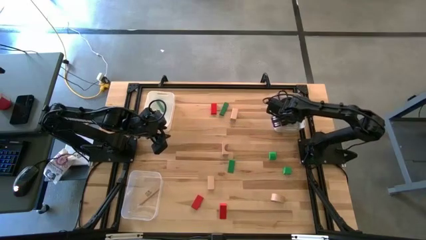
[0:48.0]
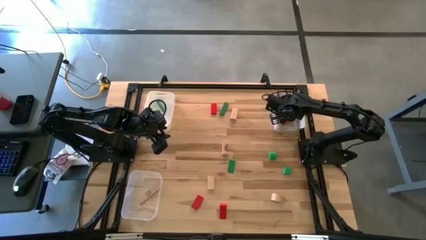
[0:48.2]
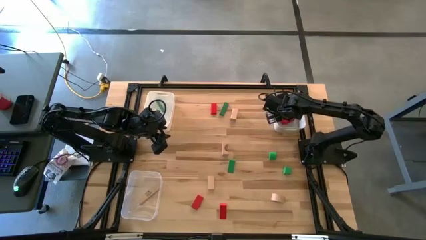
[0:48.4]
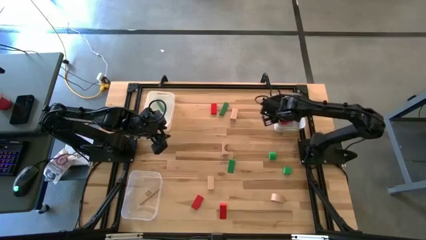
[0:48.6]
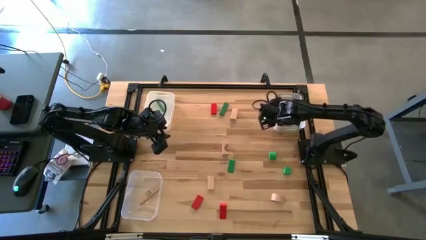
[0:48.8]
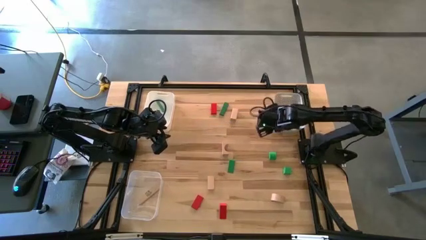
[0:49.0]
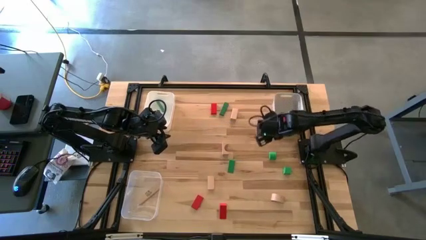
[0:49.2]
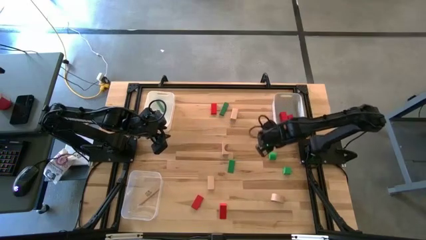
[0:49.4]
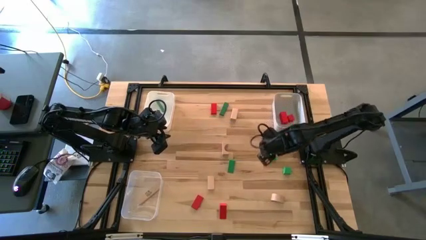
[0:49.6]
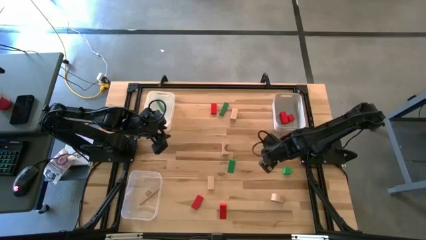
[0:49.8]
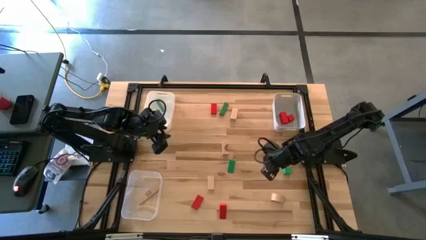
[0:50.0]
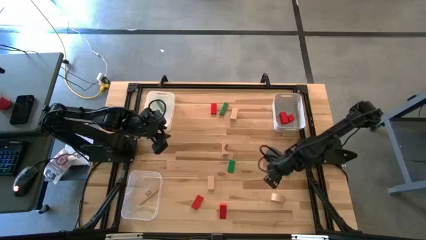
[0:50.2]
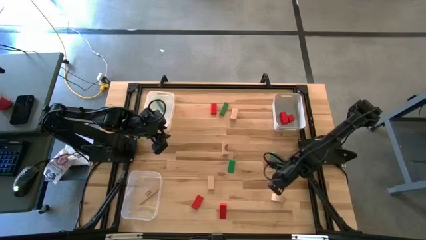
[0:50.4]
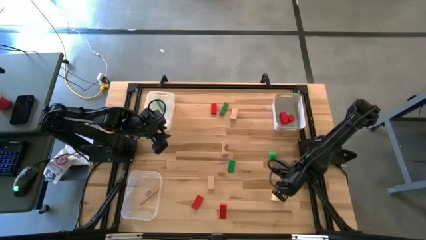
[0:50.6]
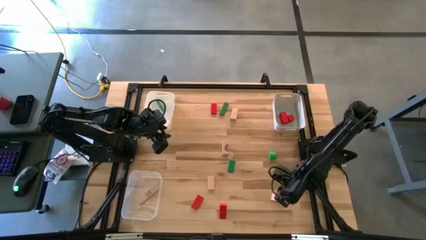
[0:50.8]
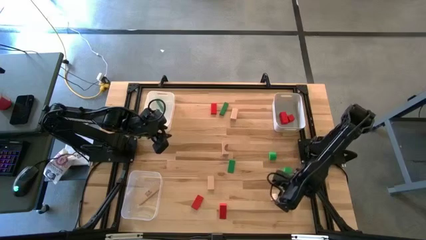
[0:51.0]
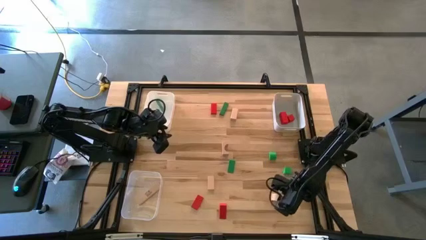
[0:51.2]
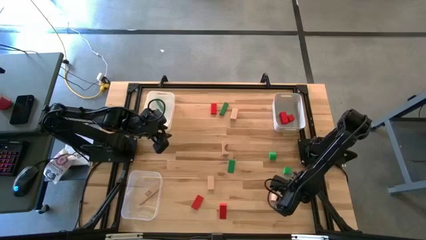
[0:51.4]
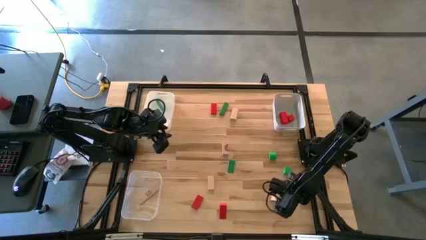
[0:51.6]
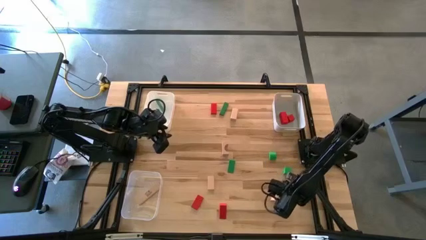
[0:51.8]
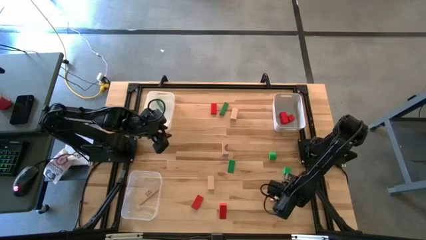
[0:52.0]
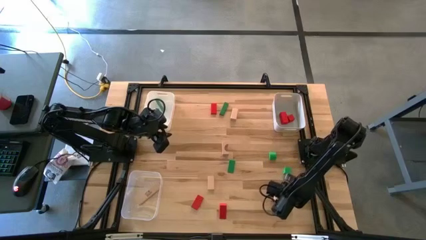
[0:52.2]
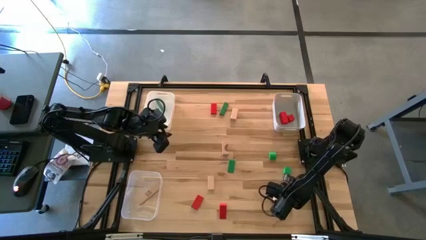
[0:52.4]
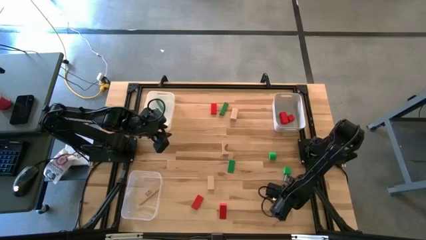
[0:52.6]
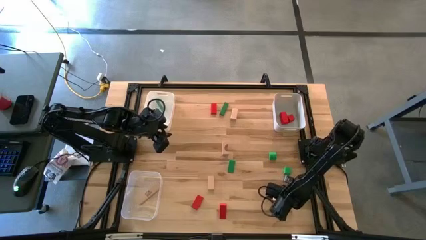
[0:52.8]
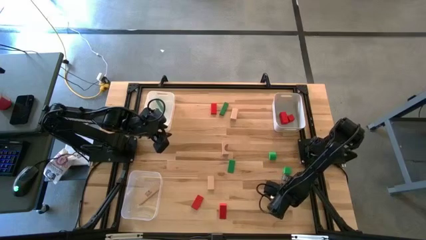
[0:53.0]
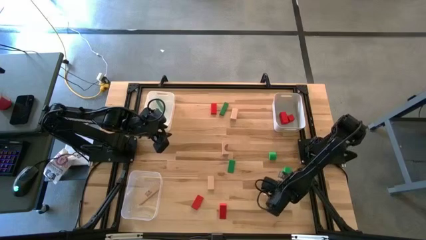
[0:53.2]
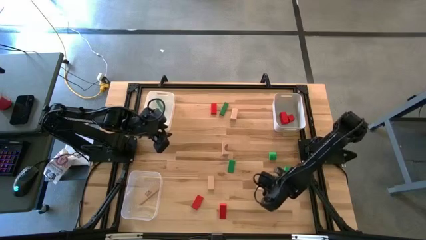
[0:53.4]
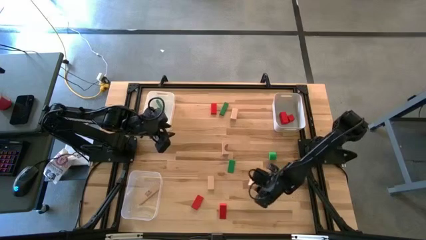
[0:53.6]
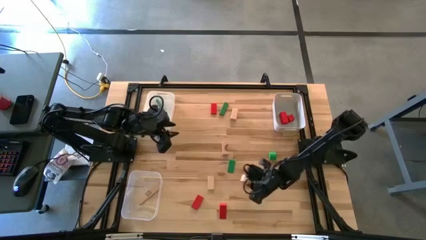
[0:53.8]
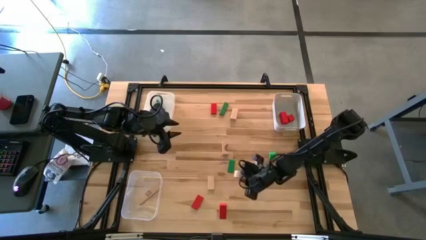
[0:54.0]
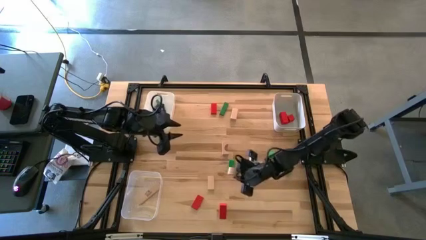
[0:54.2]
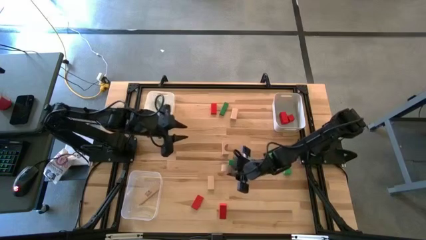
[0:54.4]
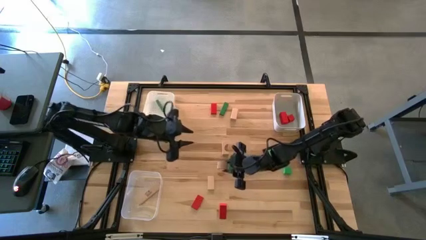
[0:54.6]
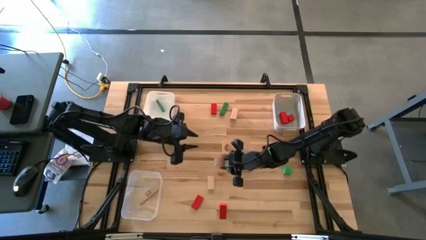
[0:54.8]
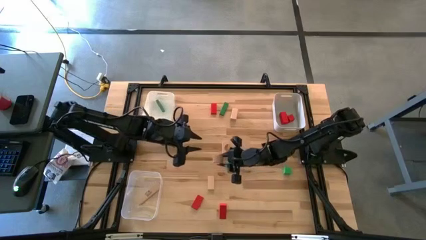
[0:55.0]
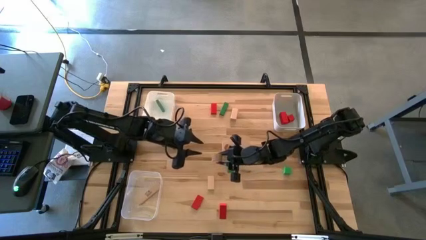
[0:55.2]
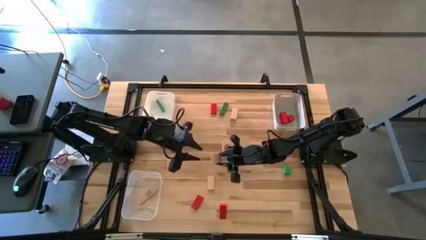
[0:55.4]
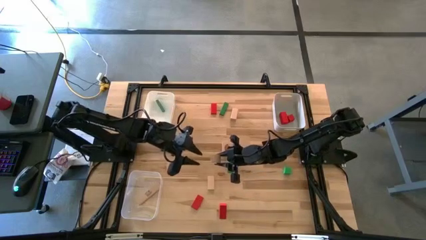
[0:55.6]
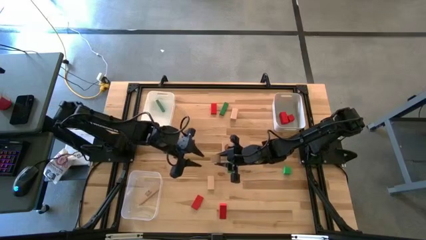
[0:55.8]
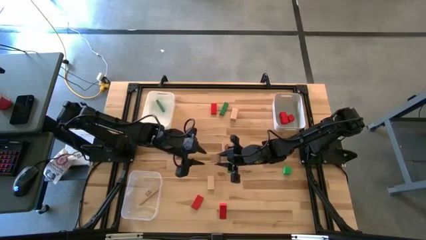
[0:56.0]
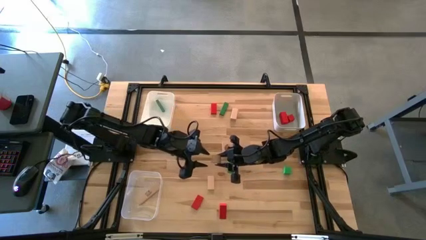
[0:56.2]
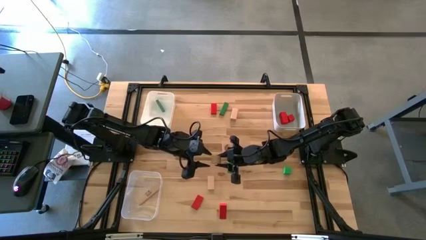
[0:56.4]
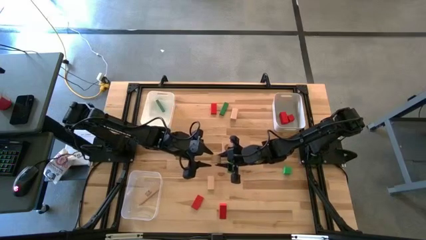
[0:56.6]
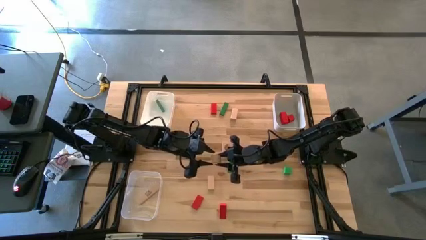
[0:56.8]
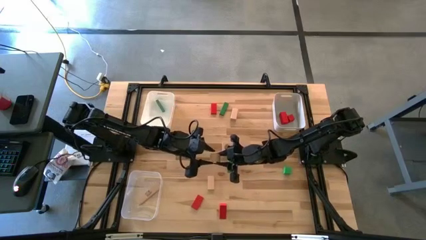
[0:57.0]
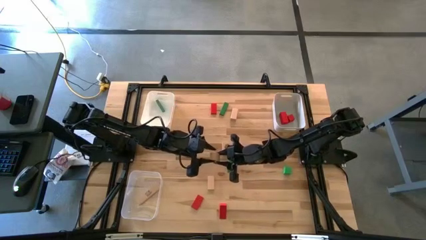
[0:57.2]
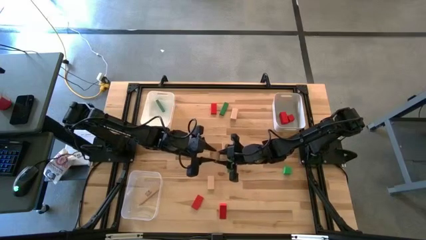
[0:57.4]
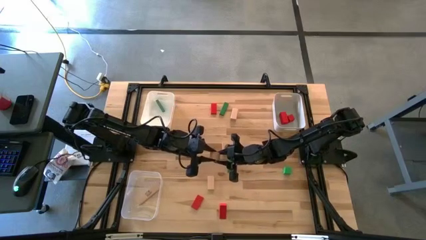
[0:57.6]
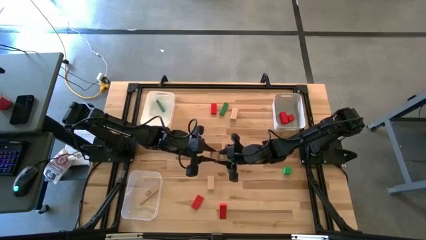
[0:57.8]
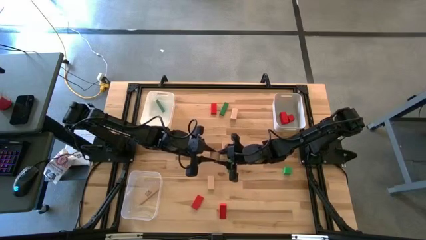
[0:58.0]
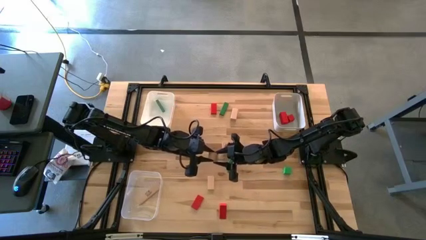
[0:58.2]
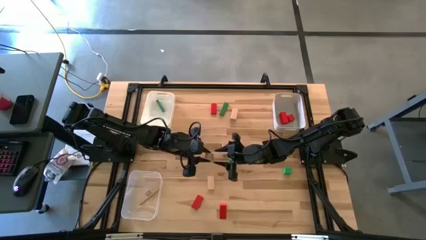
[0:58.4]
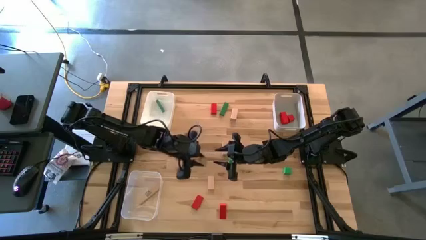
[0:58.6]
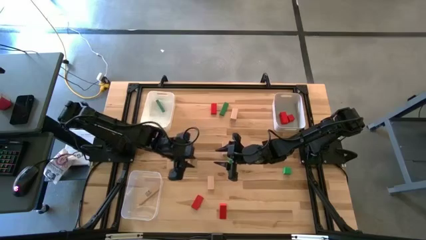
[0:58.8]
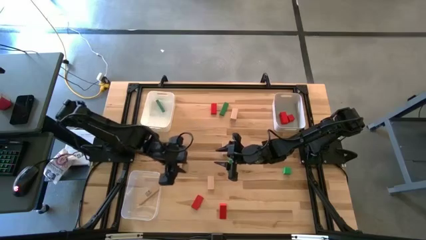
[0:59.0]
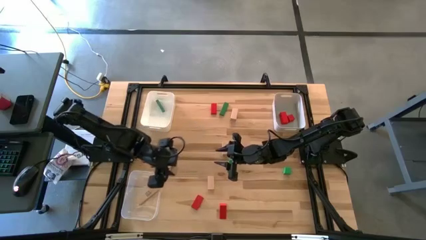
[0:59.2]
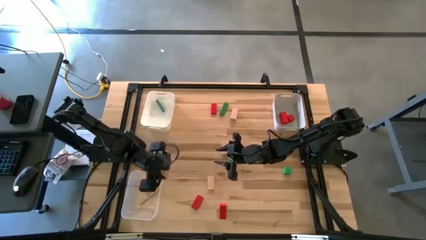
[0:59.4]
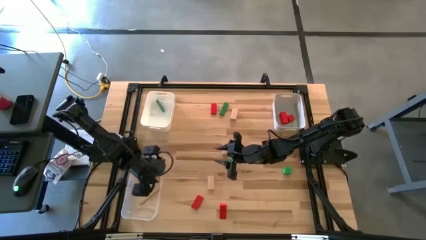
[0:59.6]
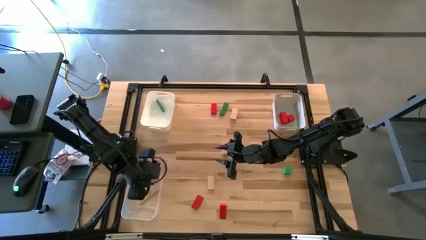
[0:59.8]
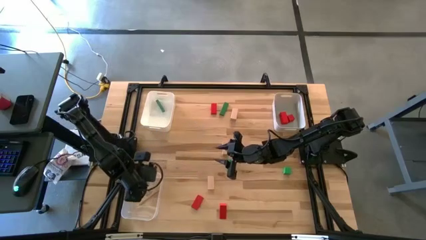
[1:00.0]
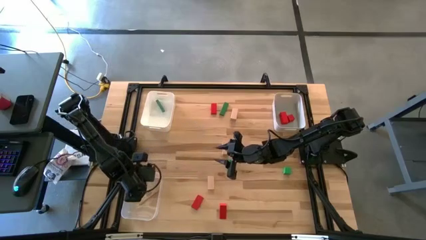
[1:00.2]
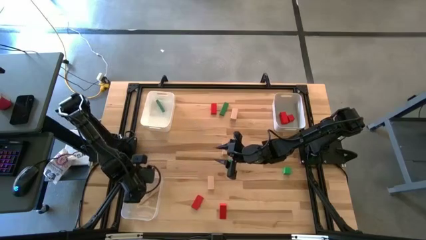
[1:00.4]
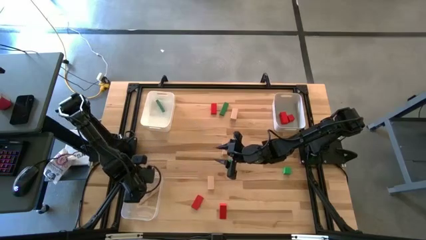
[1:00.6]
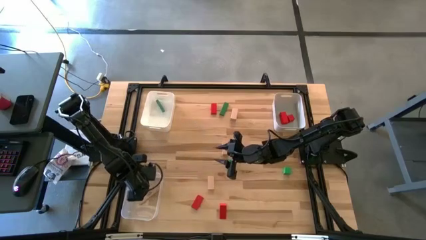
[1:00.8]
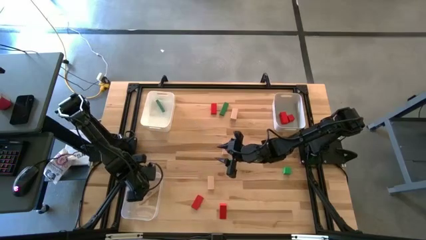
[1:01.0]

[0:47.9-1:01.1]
Task: Sort & place blocks by color
Put the brown block into the transparent bin
